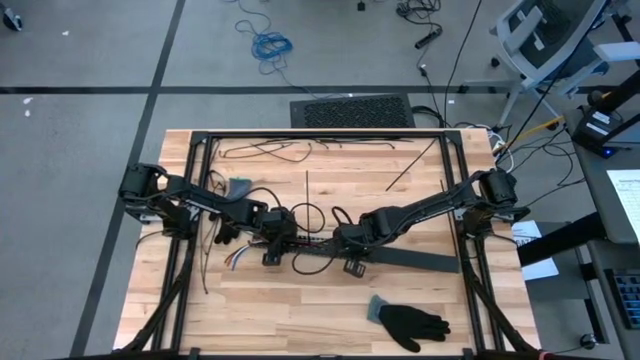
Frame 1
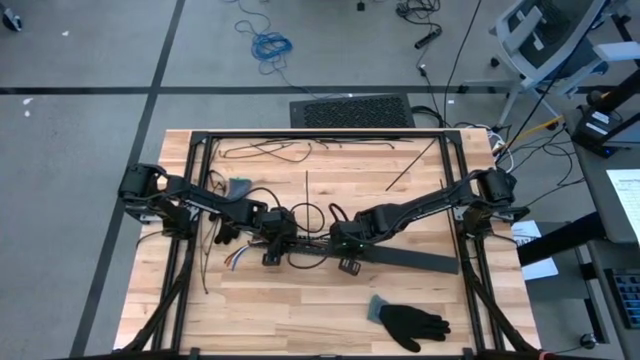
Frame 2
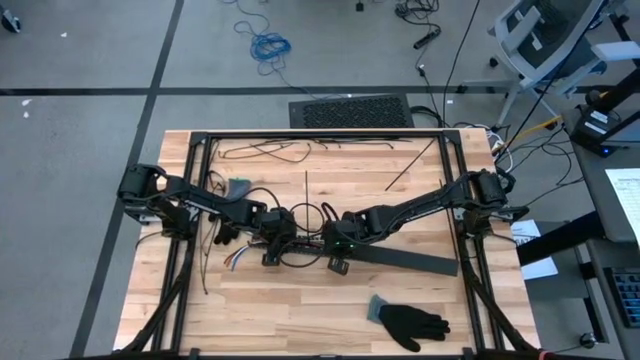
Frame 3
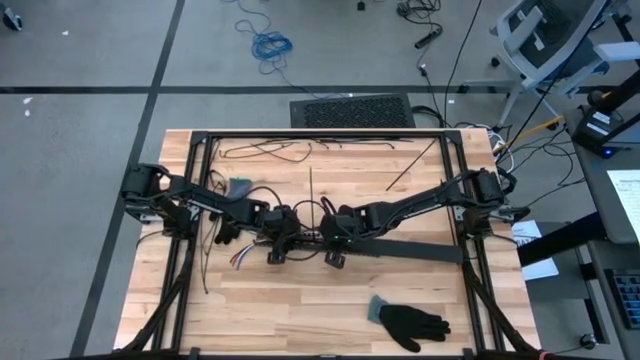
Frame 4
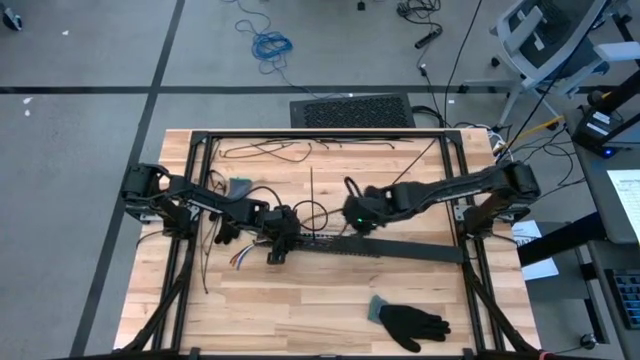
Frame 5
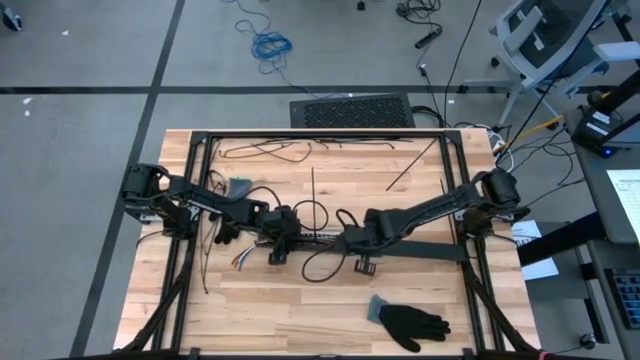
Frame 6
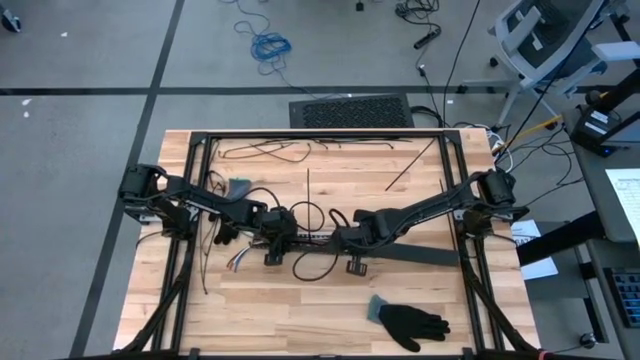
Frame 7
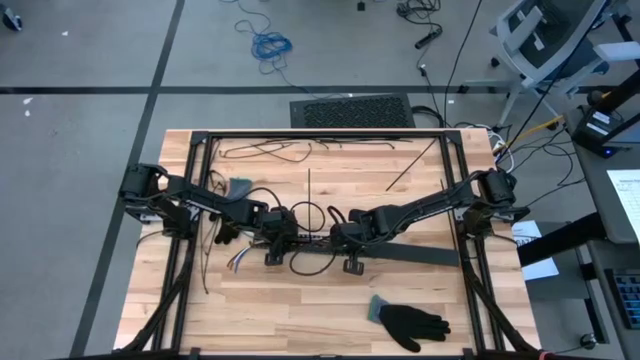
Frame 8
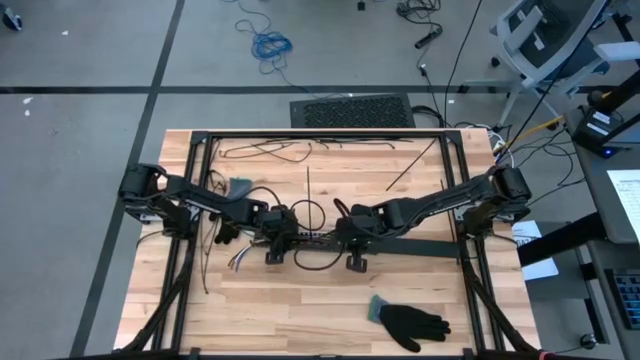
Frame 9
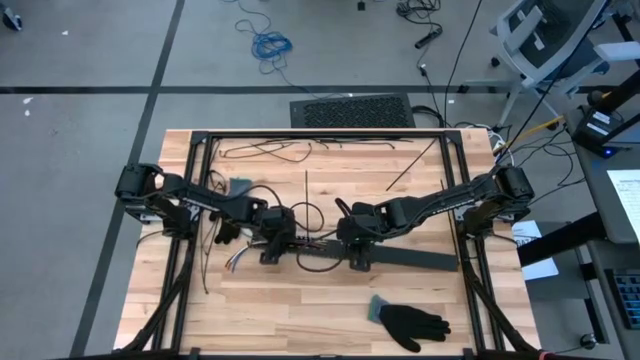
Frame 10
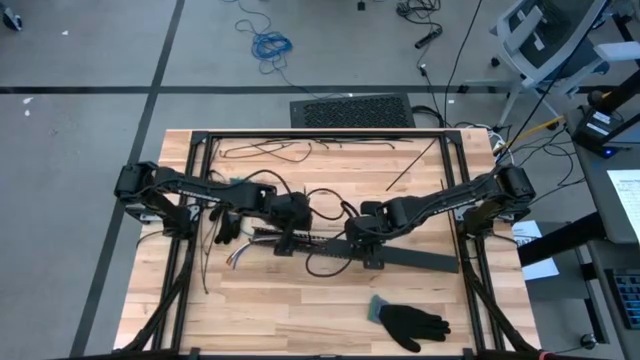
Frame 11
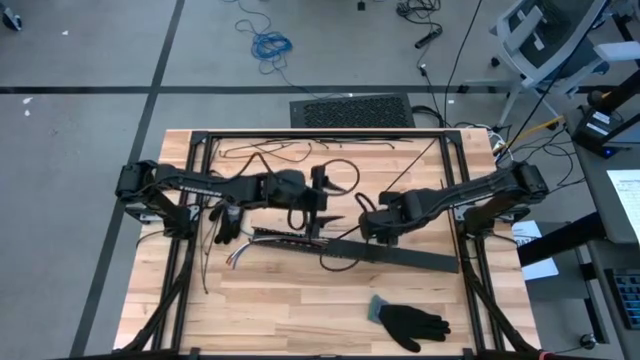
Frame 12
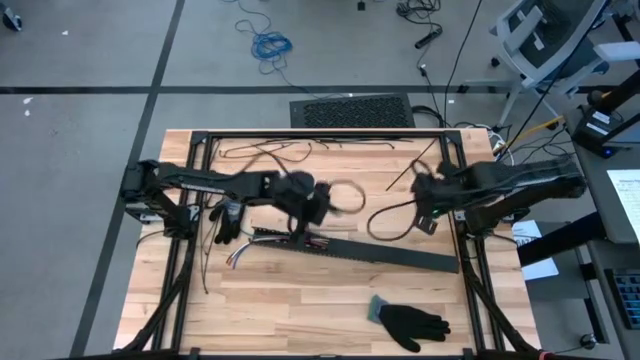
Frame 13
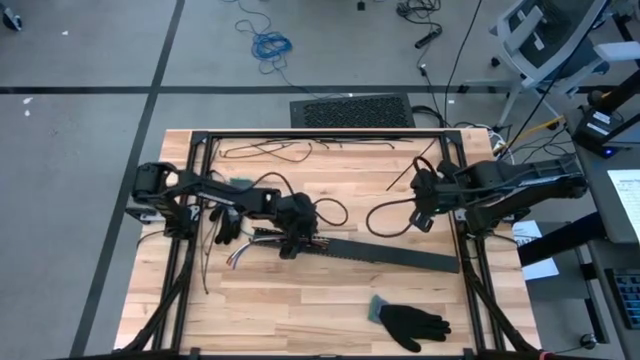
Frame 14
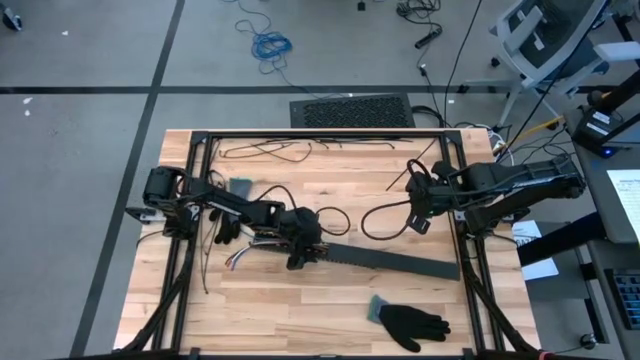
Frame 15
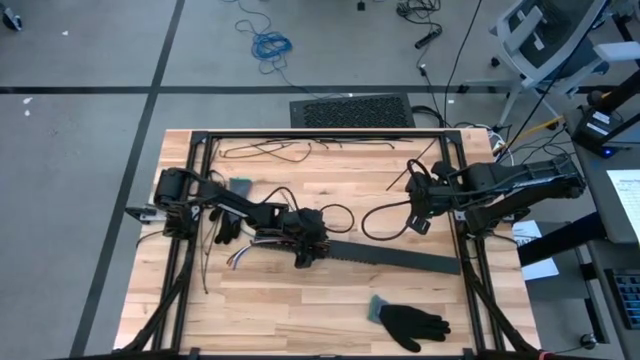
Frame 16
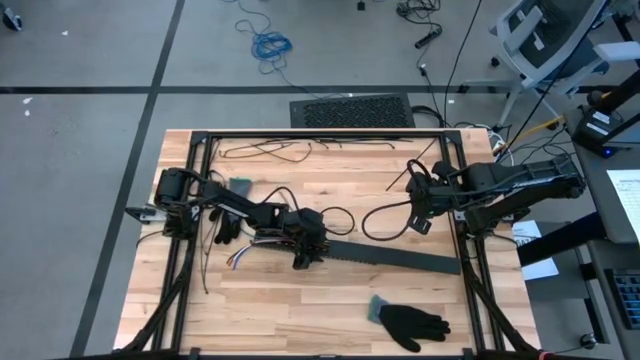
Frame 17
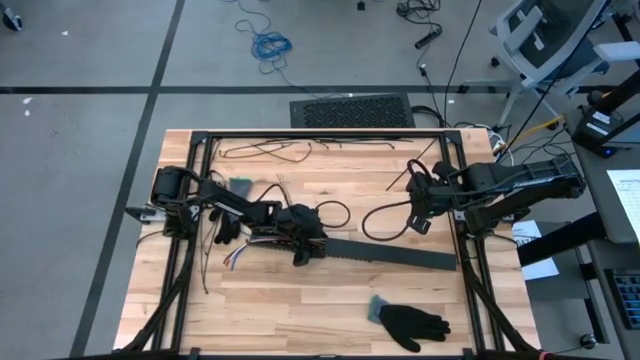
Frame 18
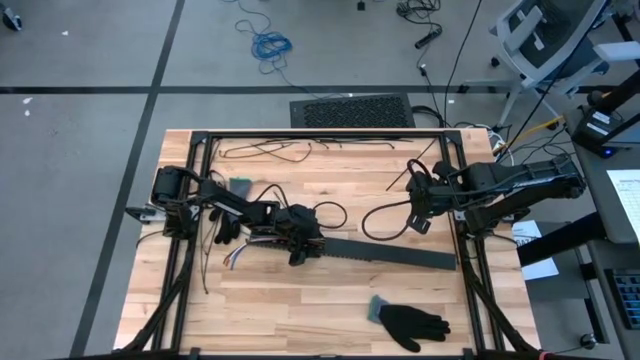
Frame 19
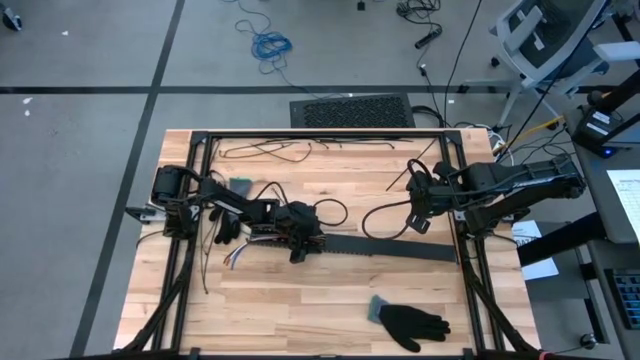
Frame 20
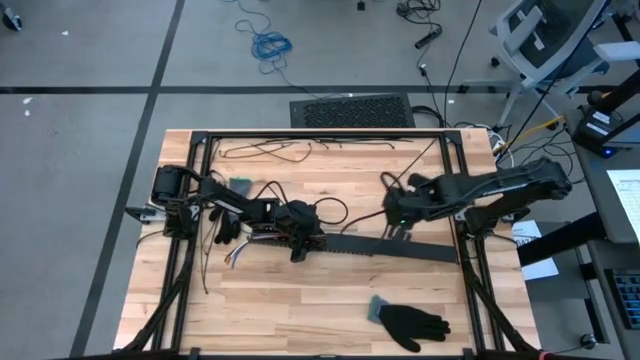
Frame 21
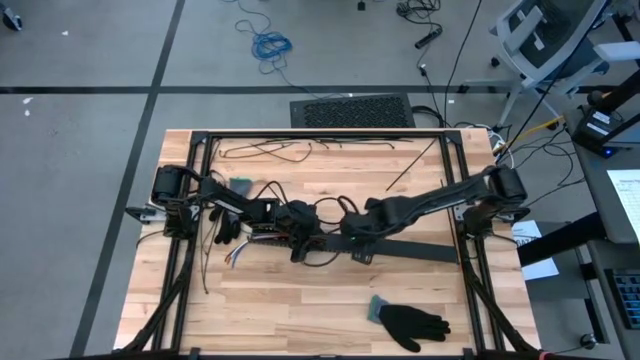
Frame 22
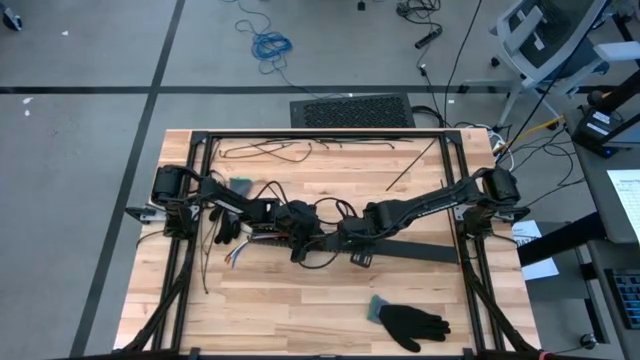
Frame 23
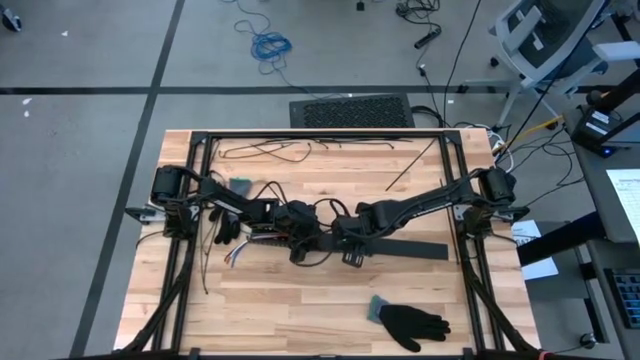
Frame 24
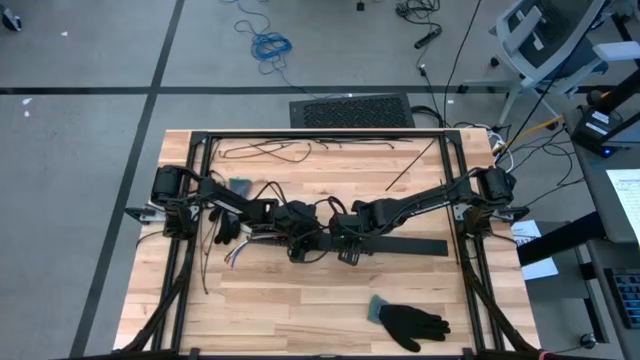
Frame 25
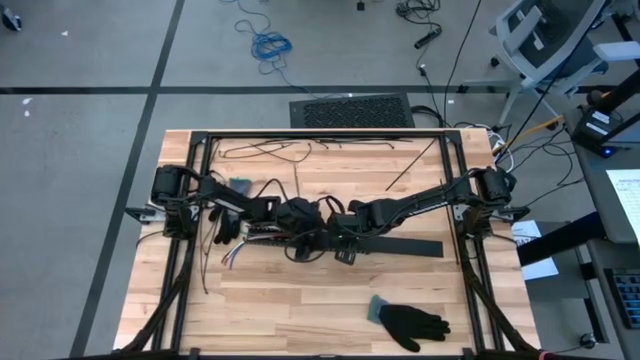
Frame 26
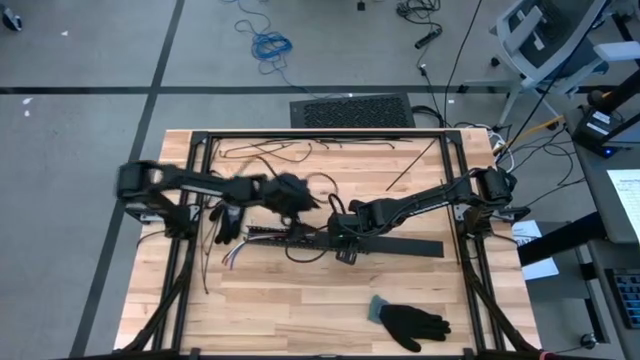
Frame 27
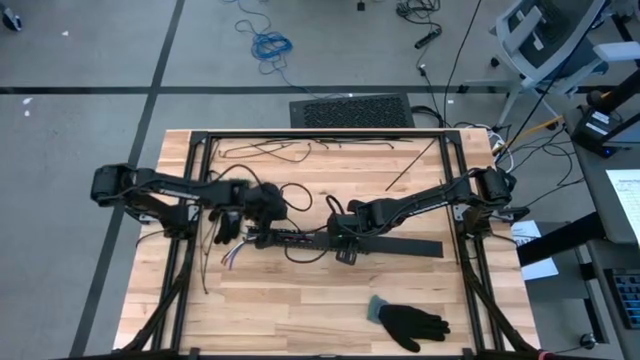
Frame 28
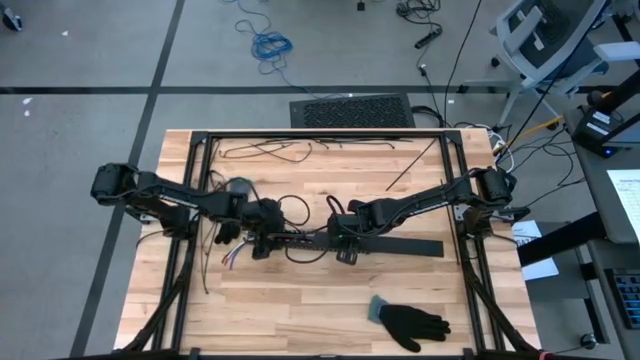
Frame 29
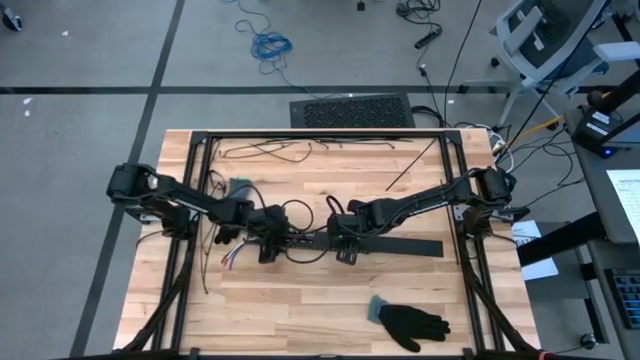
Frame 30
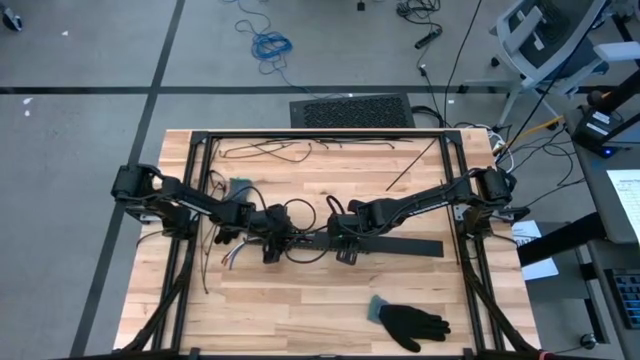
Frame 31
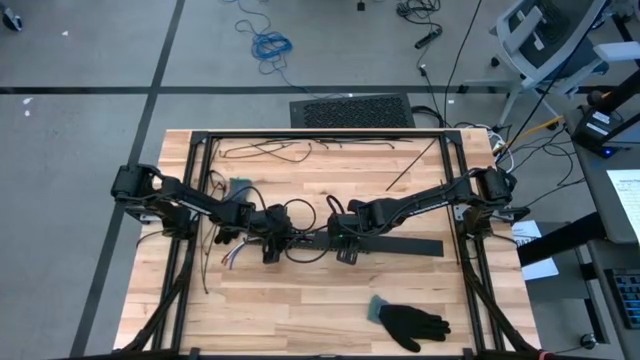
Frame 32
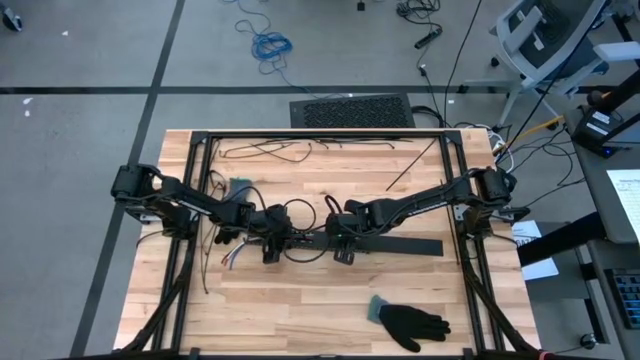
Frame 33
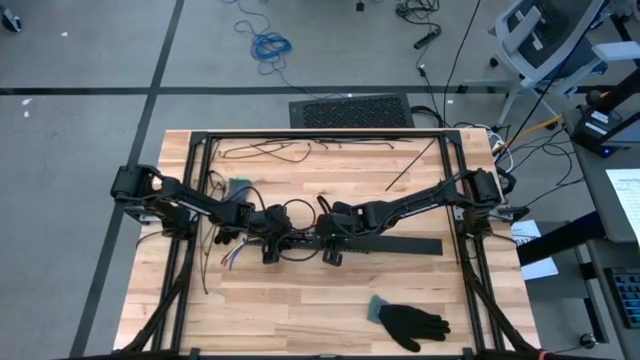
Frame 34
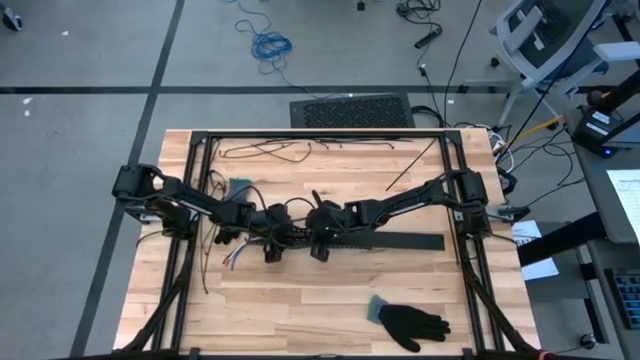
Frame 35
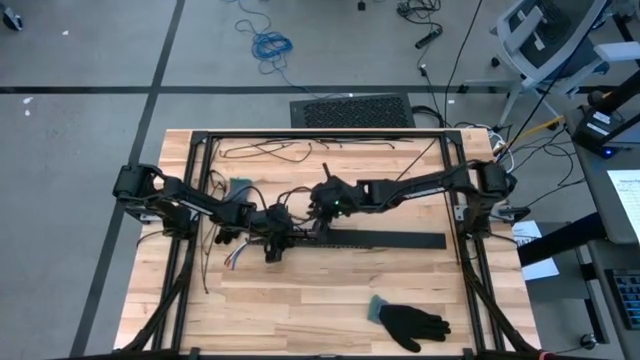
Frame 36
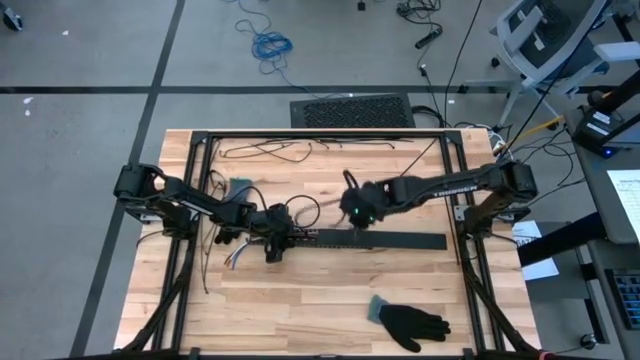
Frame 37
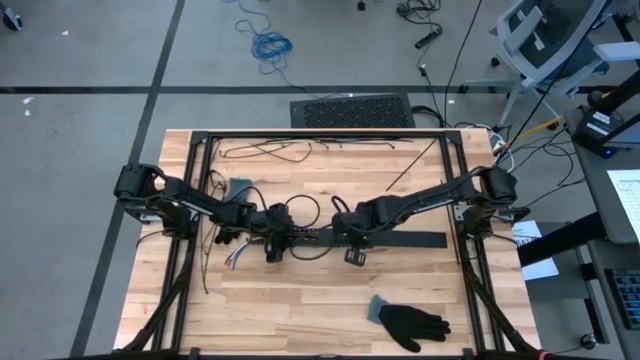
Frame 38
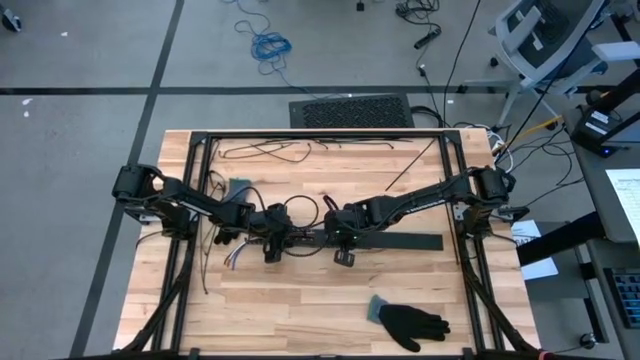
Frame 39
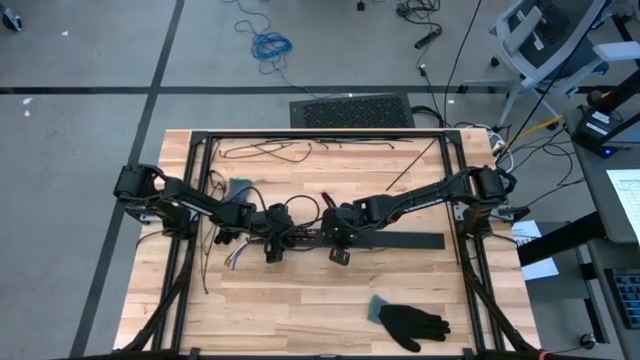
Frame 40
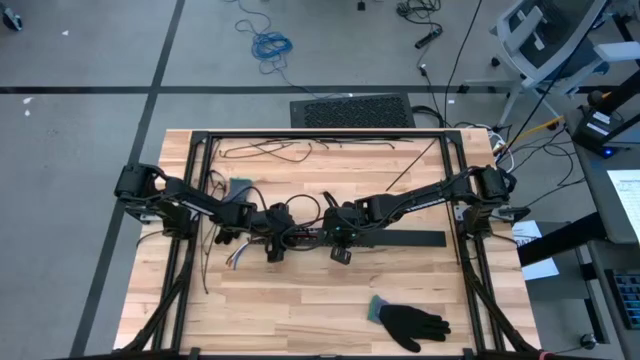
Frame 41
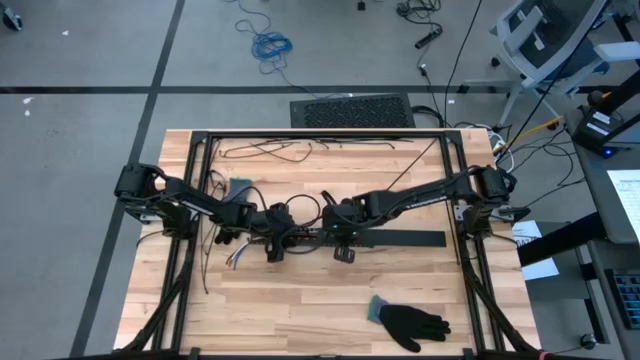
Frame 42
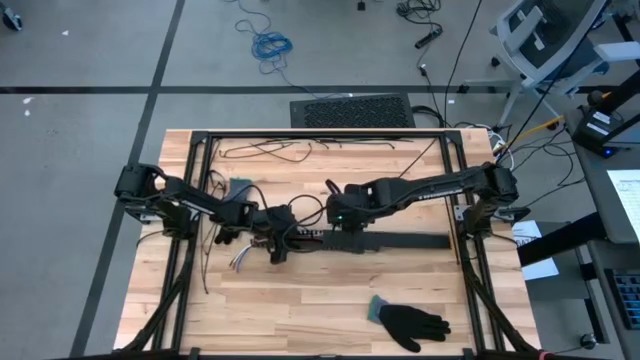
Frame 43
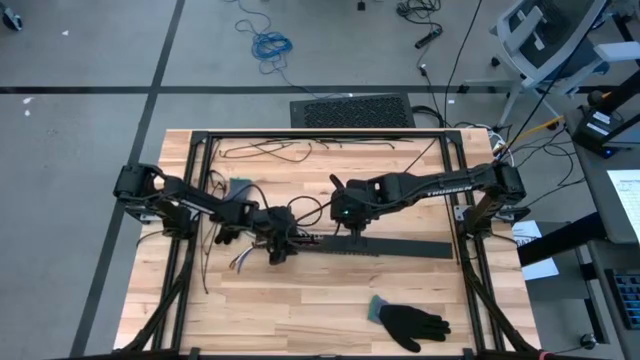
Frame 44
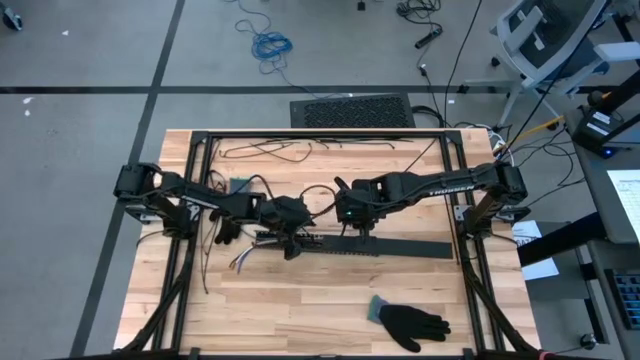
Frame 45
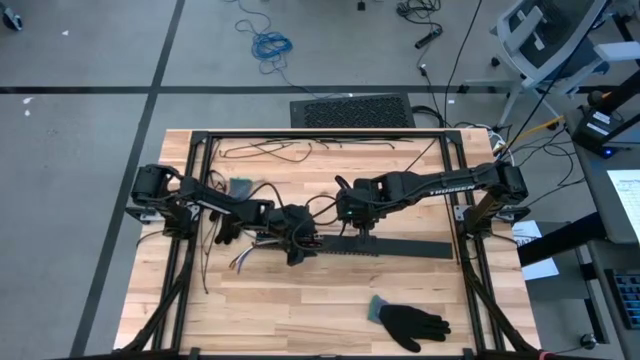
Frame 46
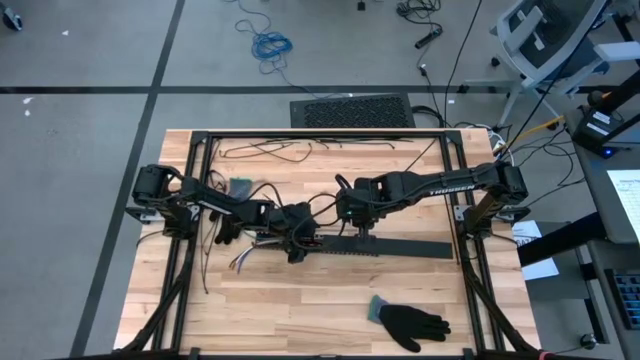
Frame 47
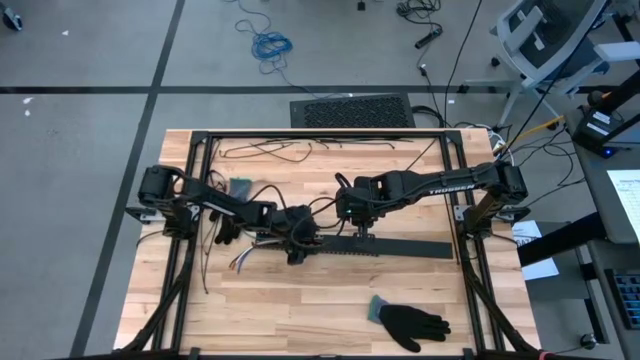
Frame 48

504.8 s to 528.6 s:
Task: Ziptie cables
Close the cable duct with the cable duct cover
